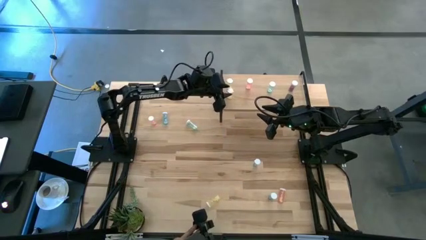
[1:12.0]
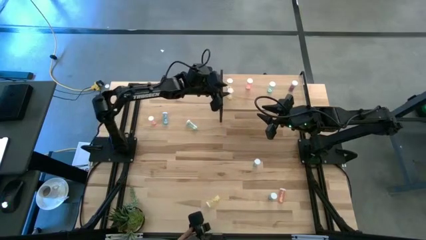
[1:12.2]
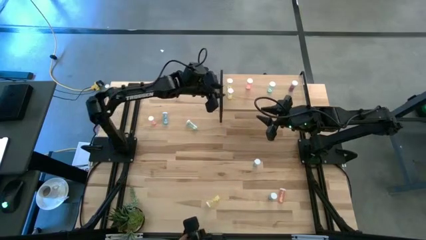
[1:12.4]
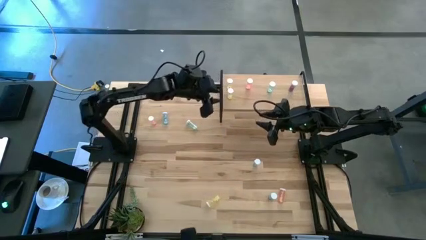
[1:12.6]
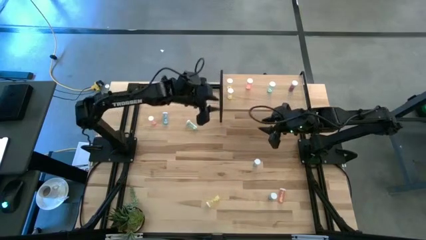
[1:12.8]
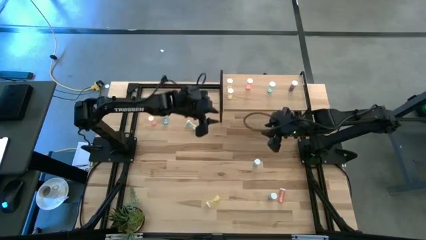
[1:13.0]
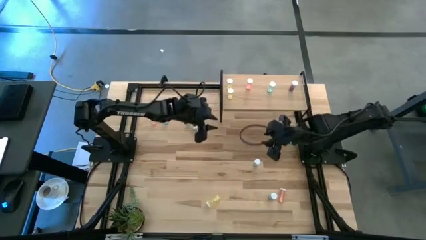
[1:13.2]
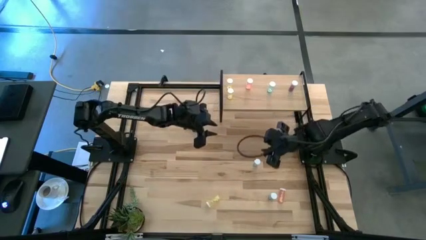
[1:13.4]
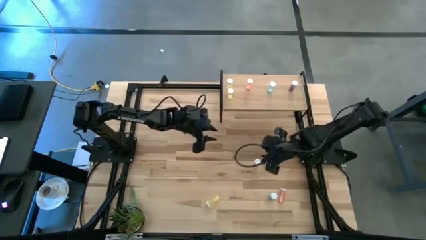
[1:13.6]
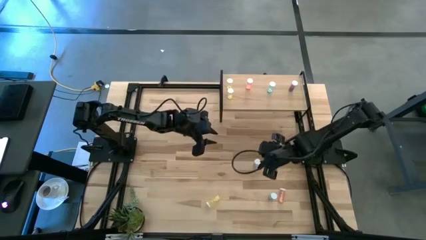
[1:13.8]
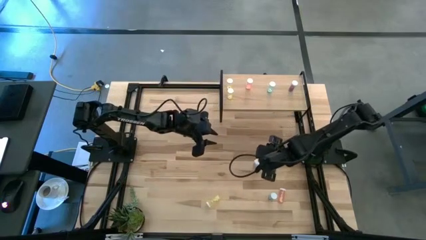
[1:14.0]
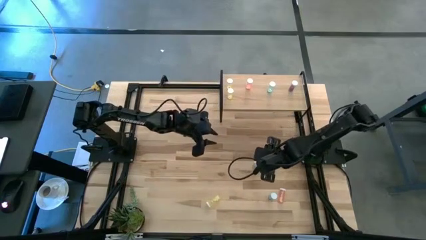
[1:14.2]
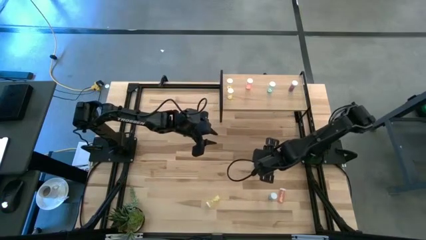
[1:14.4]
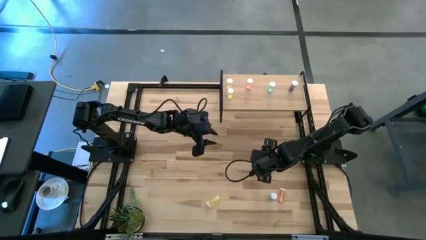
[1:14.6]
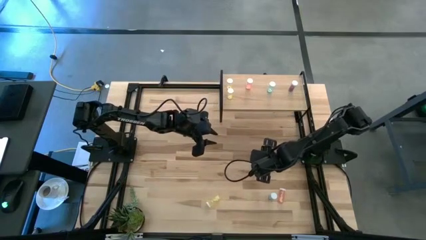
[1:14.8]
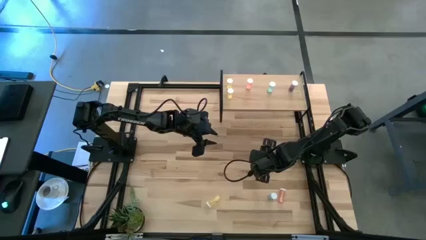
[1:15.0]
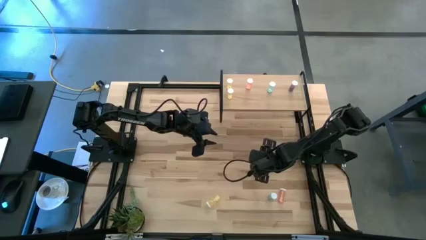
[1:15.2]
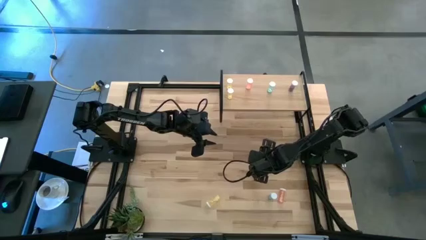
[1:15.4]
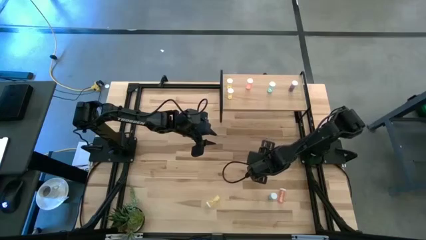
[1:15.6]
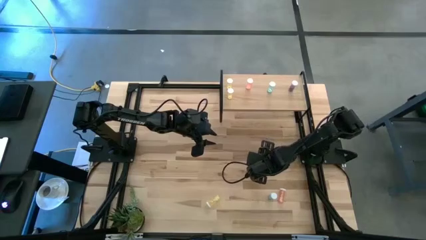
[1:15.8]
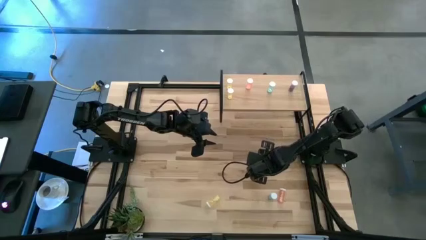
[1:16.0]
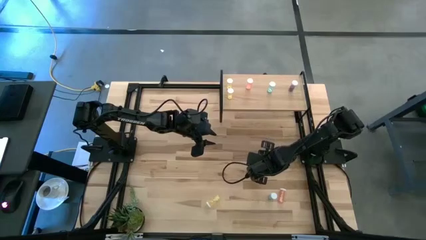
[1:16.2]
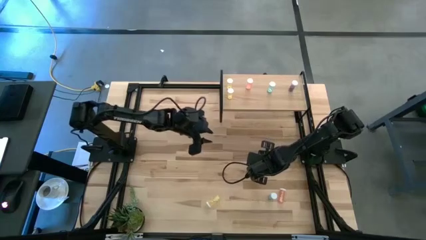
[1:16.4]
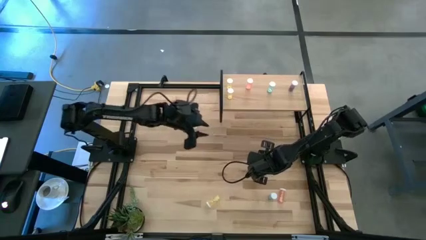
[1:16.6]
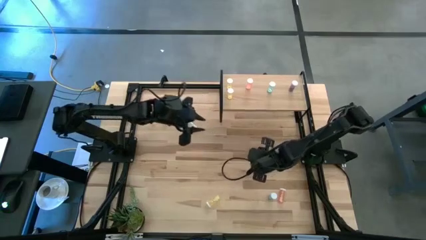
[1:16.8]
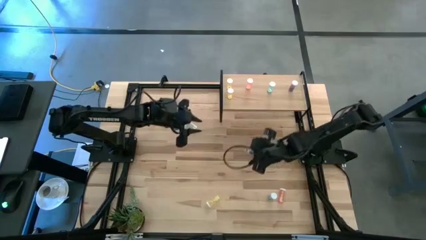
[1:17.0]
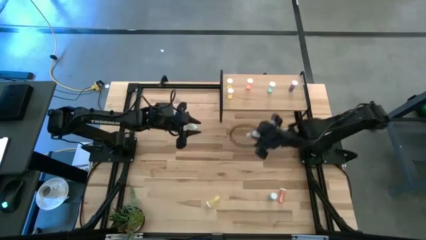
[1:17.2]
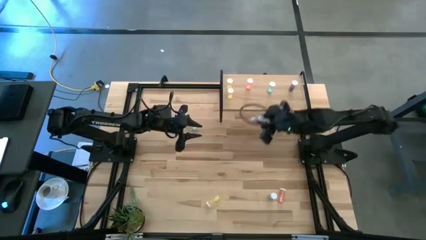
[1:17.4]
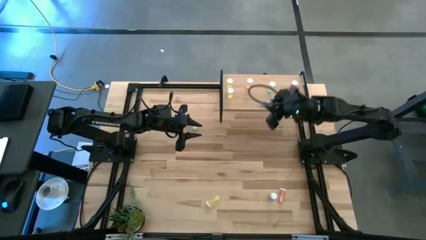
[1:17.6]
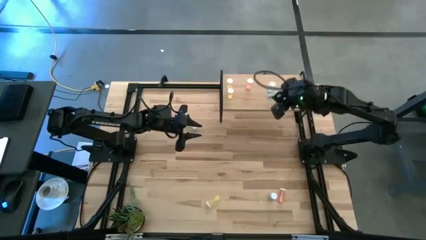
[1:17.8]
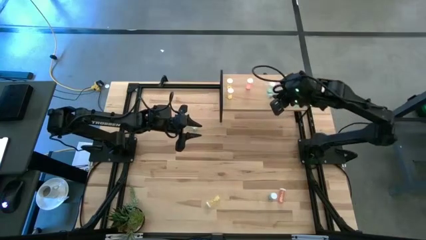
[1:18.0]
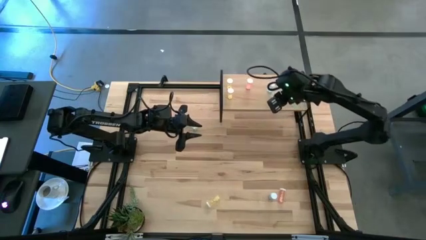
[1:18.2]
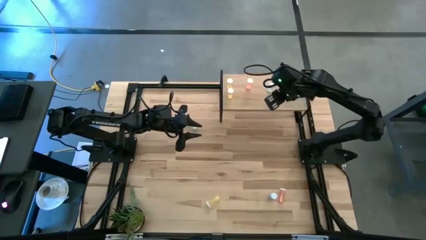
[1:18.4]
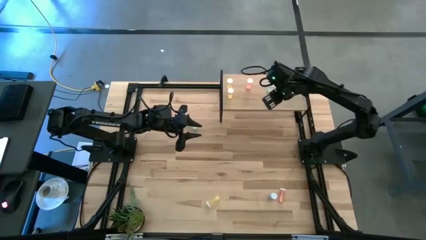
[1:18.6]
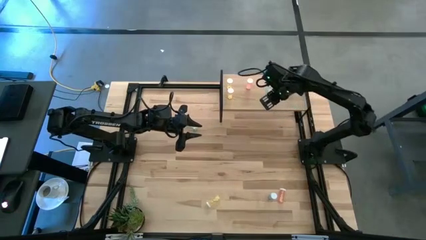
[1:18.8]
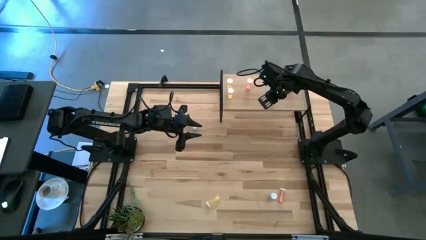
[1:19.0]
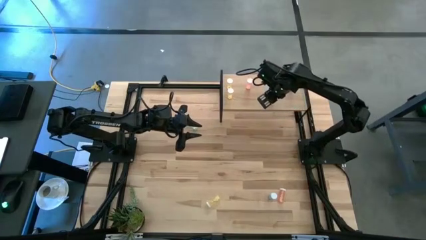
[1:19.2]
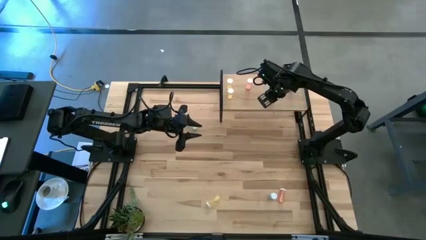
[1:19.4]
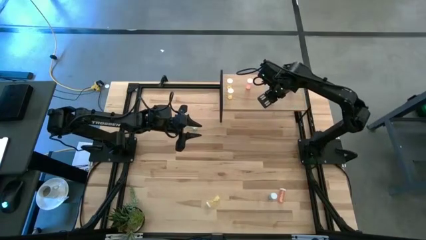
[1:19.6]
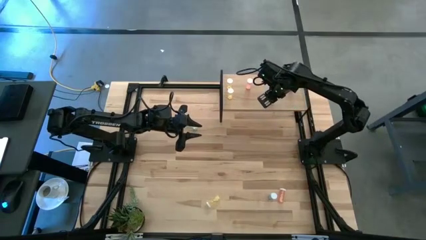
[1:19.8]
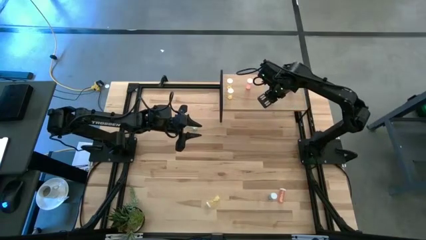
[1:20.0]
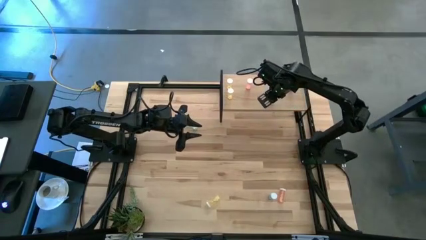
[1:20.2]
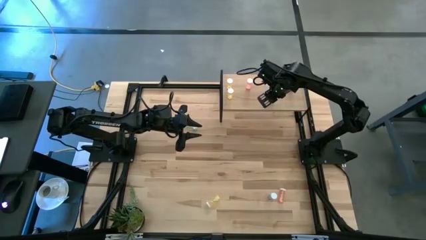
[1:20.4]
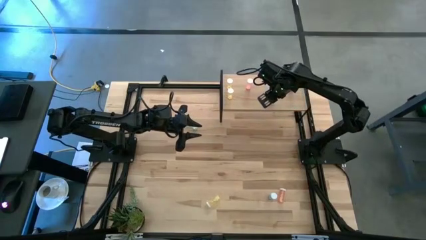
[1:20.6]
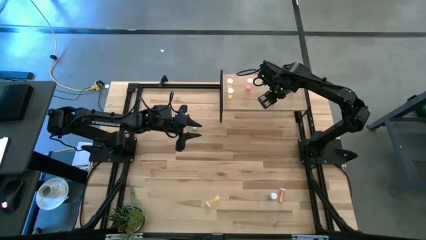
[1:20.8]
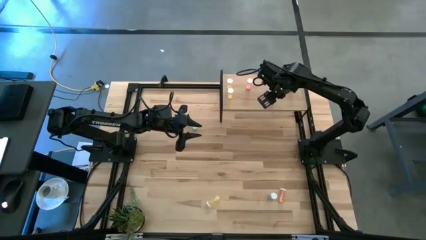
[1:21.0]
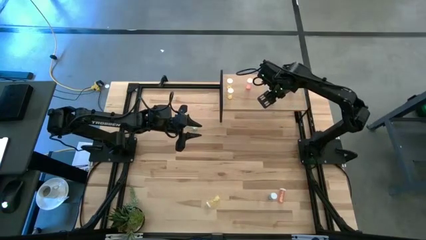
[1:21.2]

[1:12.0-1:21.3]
Task: Pick and place medicine bottles onto shelf by color
Put the right green pill bottle on the shelf aligned with the other green pill bottle

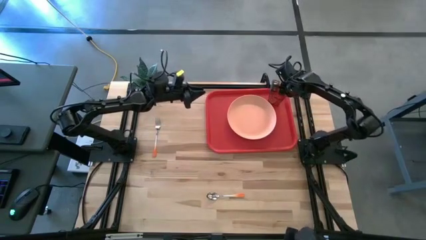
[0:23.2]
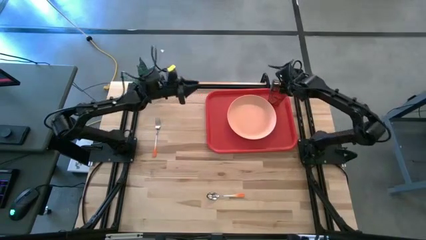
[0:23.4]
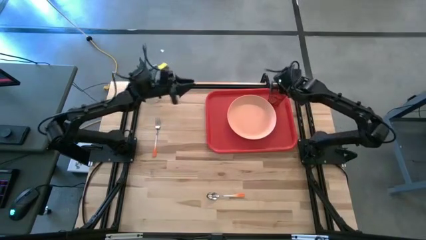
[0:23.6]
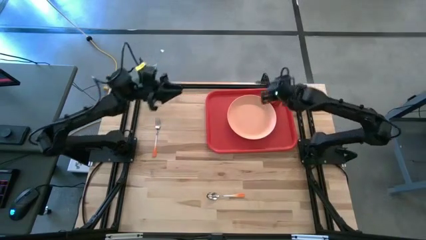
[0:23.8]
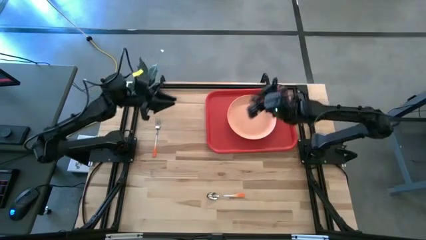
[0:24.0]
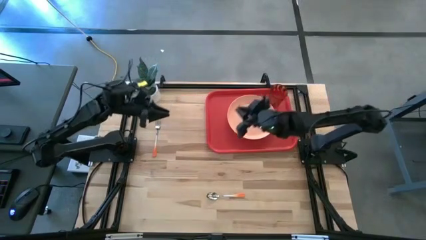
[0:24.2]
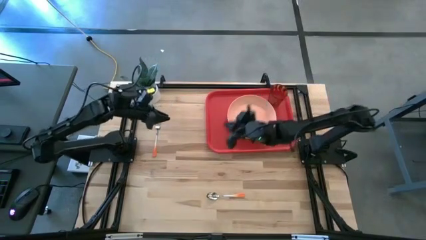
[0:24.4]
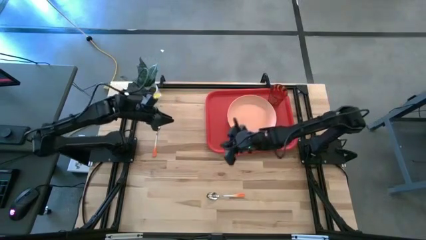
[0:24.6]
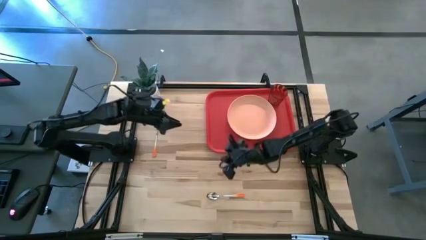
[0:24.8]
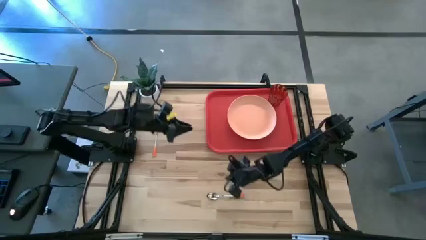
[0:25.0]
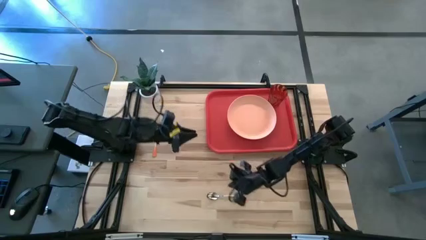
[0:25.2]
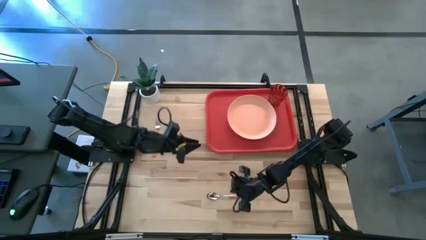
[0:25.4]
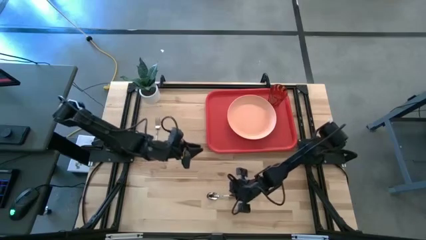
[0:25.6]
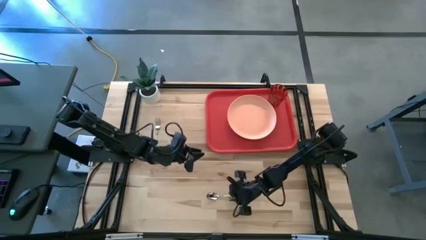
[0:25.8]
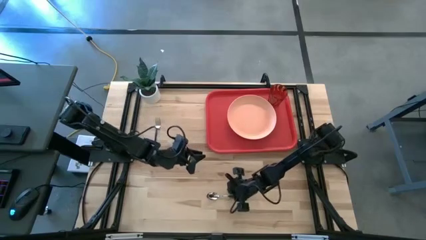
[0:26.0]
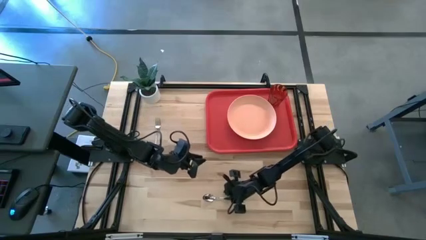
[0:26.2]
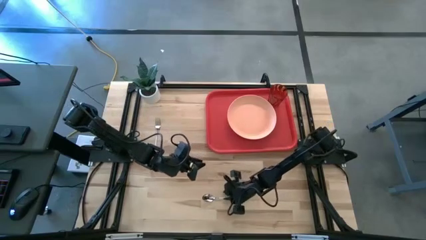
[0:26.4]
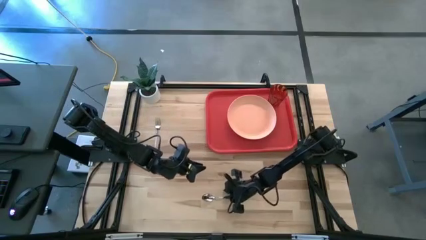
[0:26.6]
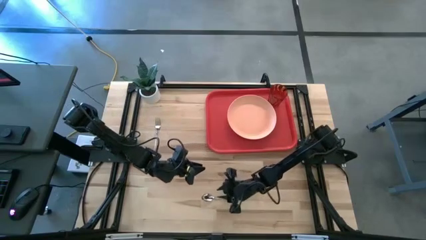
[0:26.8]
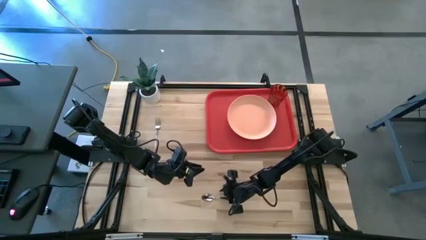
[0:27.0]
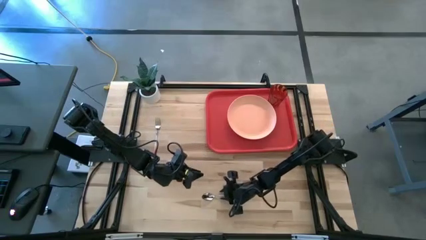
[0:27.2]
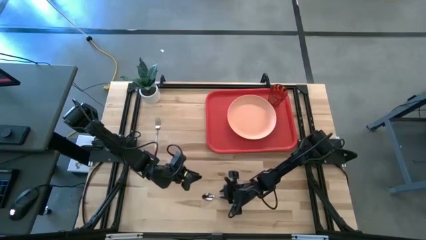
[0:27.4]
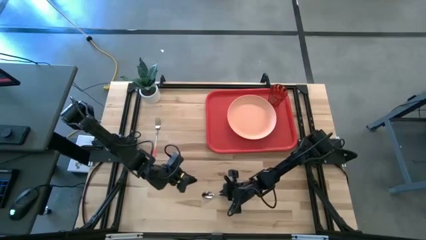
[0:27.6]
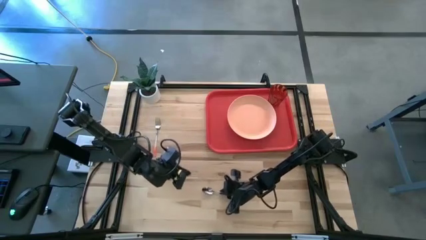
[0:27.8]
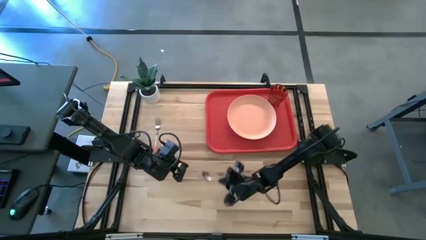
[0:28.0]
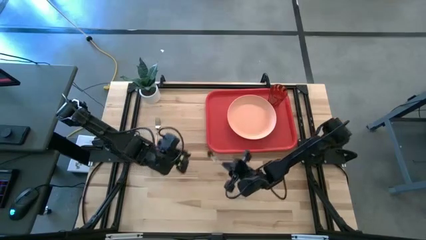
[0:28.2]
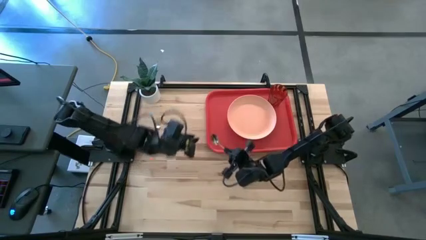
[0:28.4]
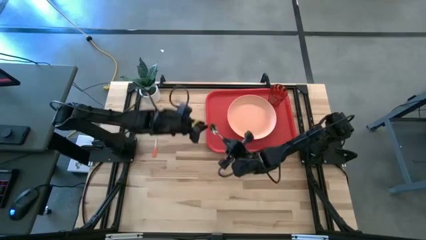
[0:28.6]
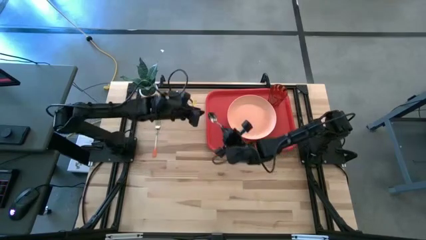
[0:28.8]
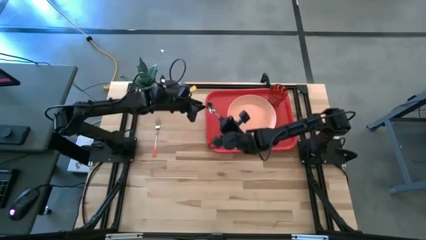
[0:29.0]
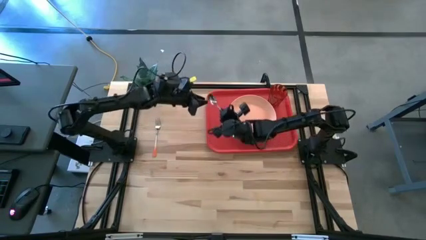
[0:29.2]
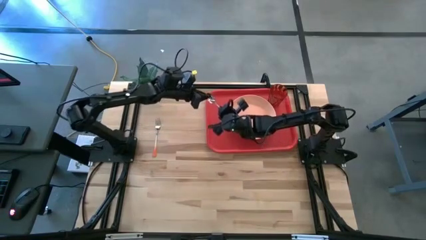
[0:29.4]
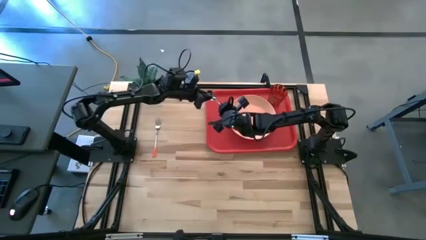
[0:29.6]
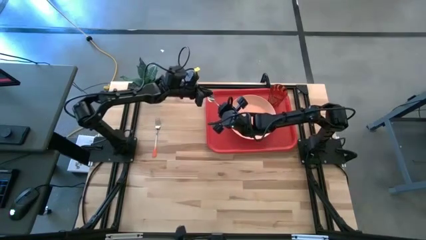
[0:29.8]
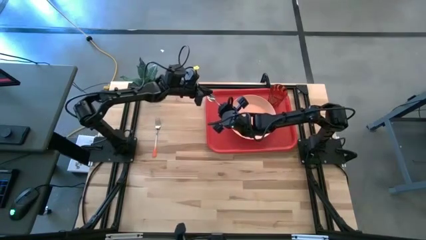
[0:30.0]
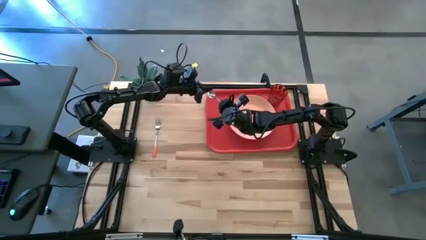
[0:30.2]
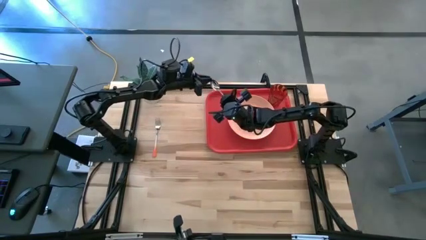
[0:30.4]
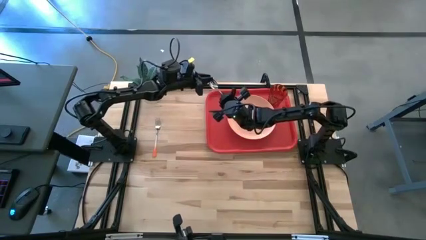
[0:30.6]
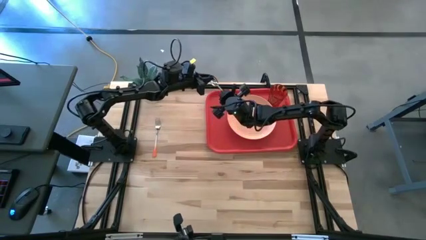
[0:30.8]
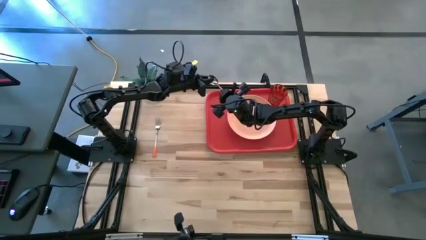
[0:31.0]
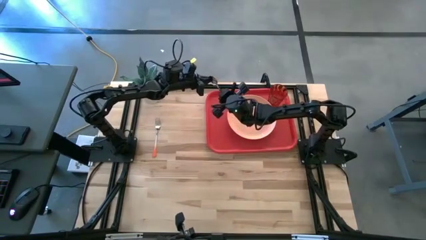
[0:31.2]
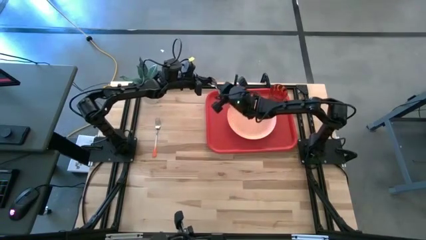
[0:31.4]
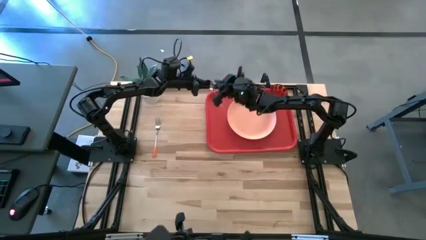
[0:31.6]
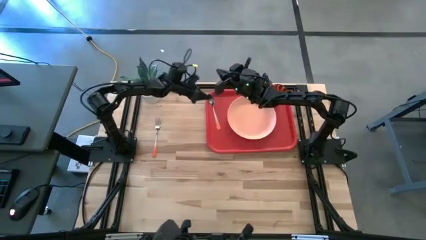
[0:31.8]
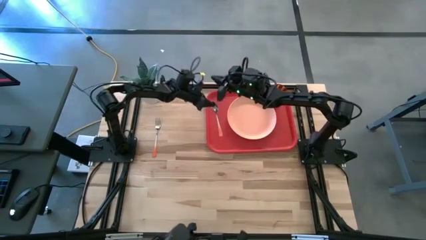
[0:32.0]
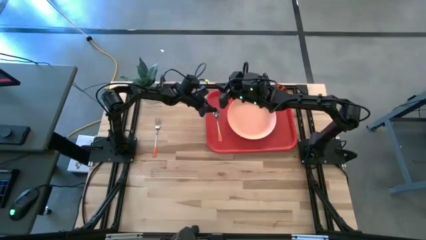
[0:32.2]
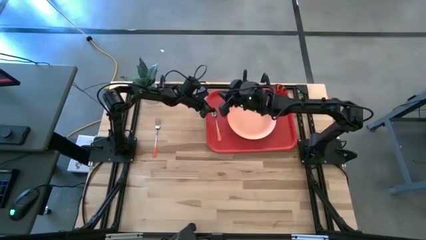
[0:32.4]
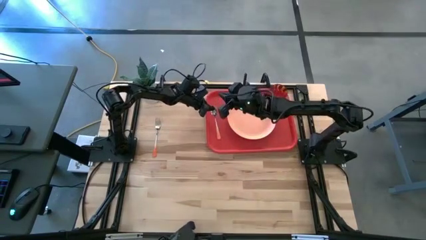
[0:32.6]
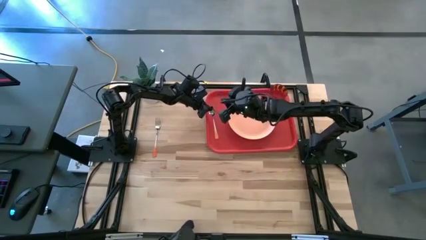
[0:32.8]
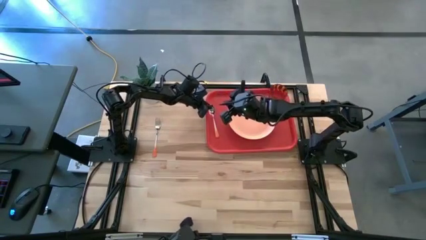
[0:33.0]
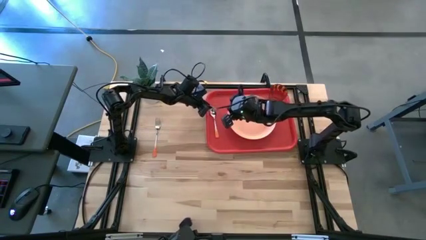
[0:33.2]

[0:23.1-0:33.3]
Task: Pick and place plate/cup/fork/spoon on tray
Put the orange spoon on the red tray to the left of the light pink plate
